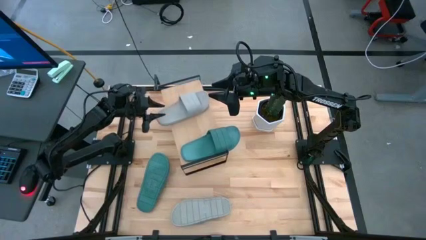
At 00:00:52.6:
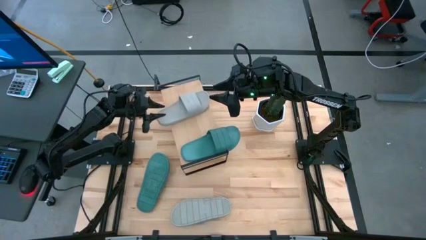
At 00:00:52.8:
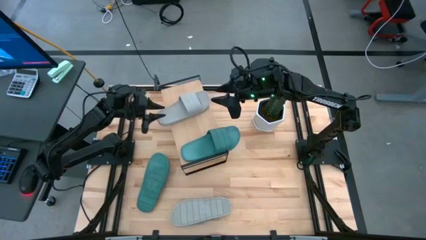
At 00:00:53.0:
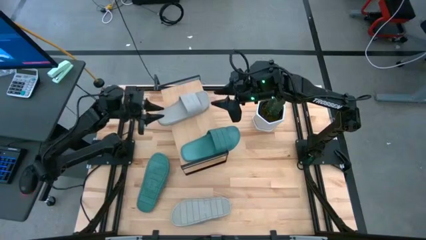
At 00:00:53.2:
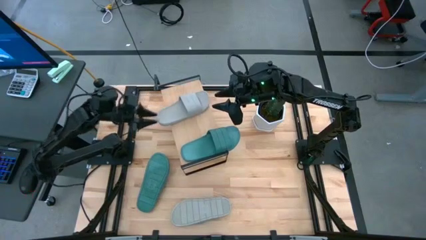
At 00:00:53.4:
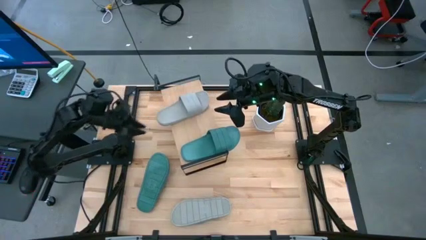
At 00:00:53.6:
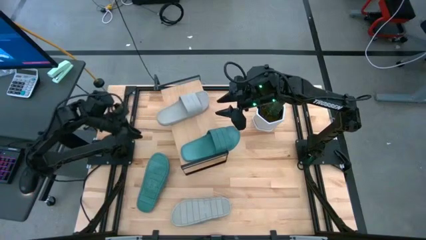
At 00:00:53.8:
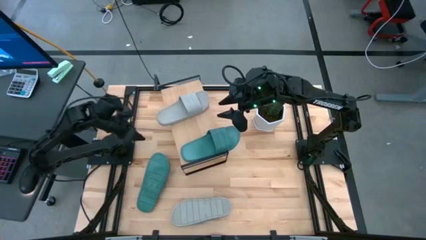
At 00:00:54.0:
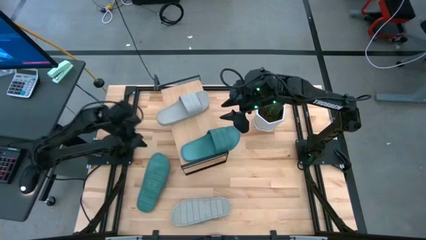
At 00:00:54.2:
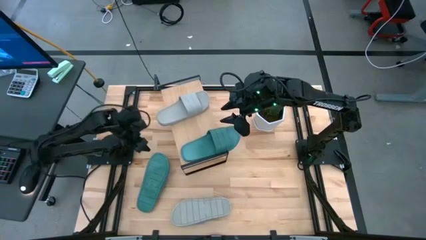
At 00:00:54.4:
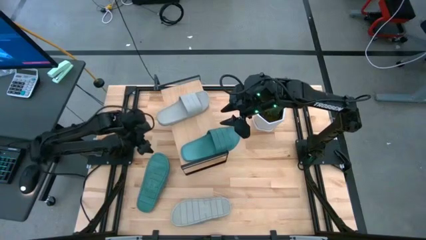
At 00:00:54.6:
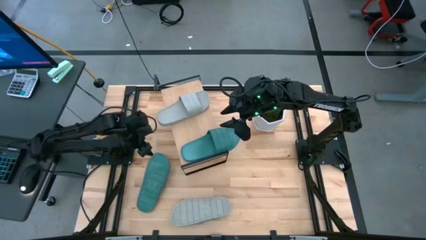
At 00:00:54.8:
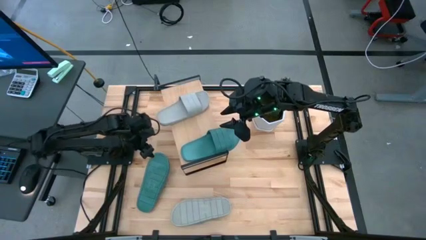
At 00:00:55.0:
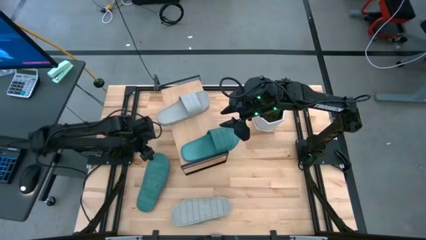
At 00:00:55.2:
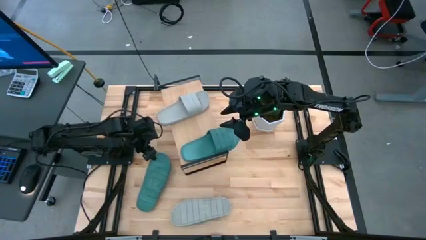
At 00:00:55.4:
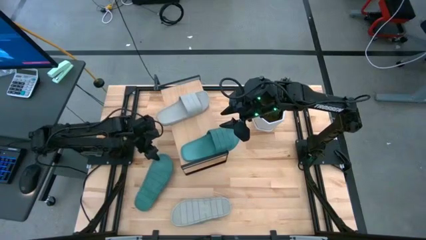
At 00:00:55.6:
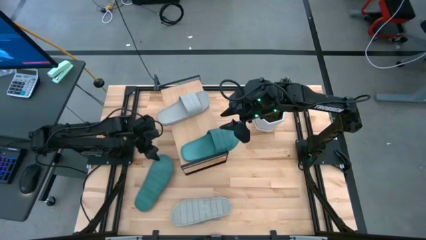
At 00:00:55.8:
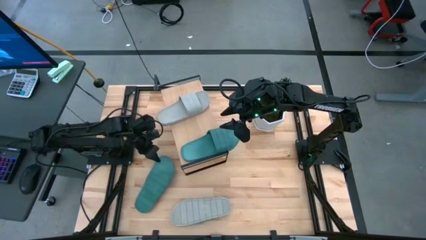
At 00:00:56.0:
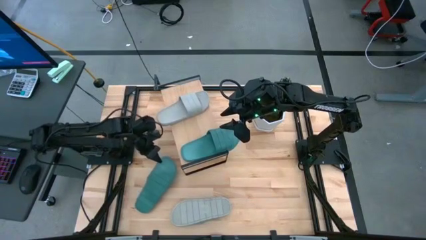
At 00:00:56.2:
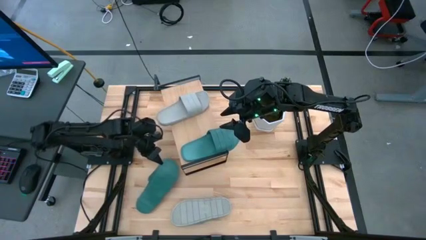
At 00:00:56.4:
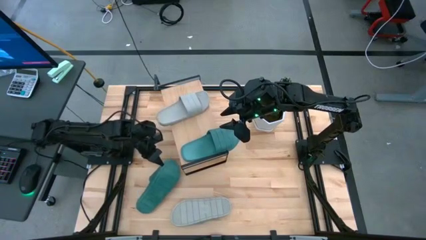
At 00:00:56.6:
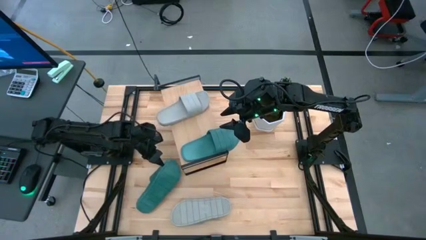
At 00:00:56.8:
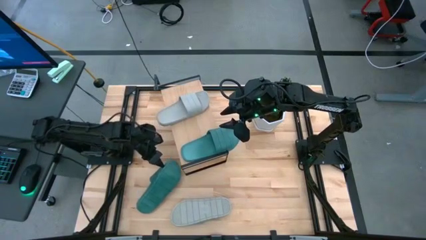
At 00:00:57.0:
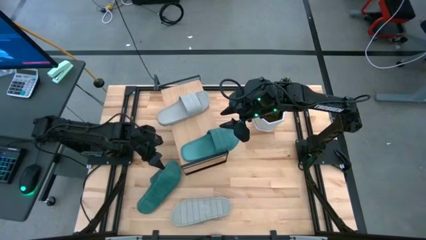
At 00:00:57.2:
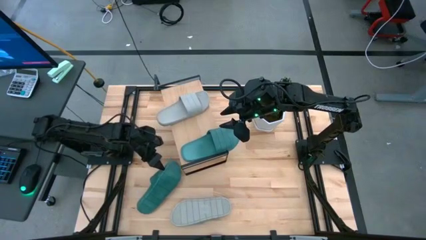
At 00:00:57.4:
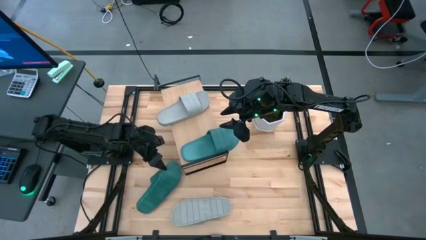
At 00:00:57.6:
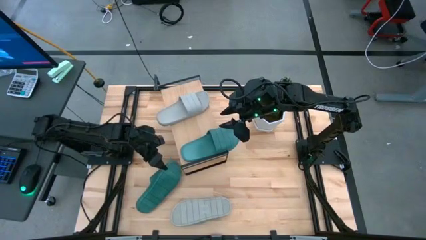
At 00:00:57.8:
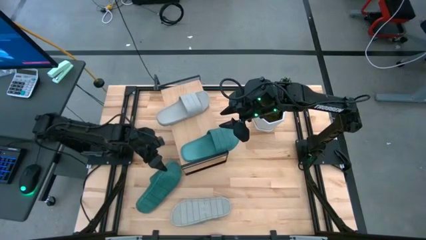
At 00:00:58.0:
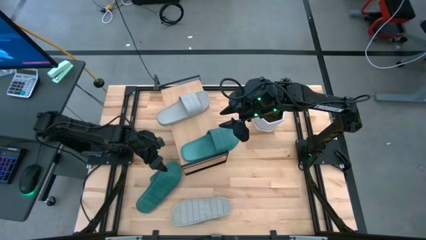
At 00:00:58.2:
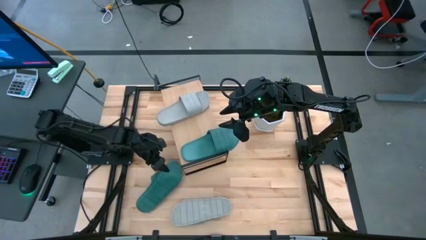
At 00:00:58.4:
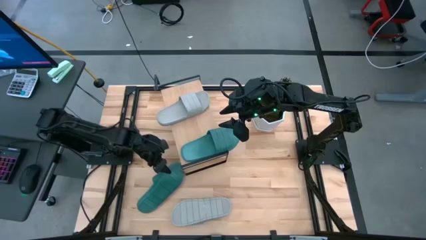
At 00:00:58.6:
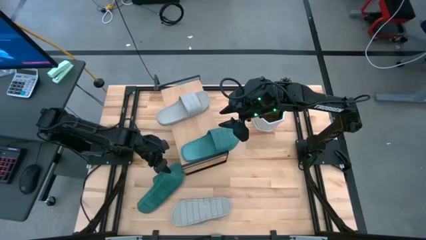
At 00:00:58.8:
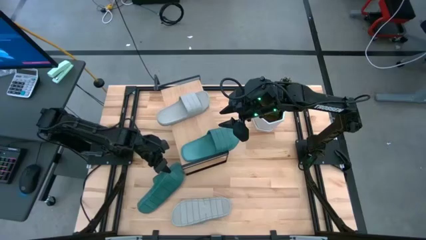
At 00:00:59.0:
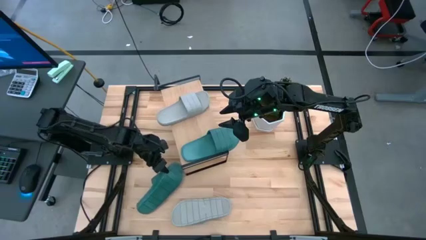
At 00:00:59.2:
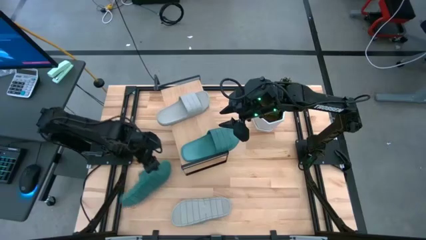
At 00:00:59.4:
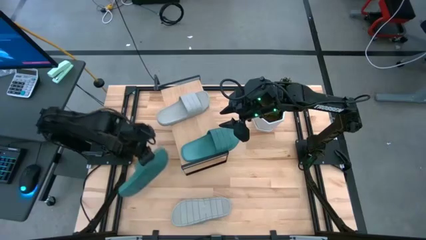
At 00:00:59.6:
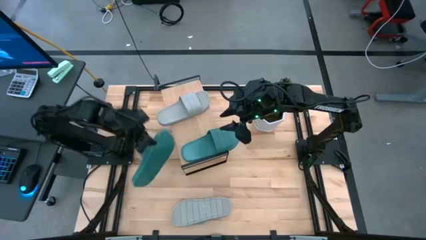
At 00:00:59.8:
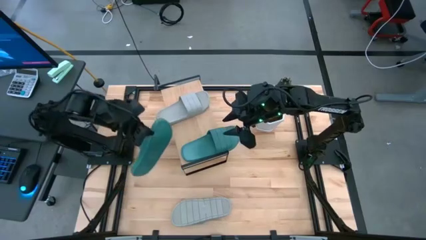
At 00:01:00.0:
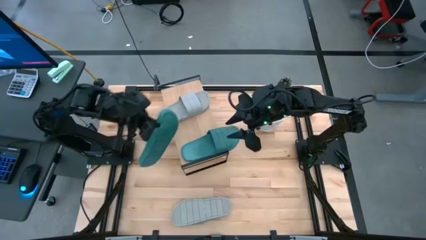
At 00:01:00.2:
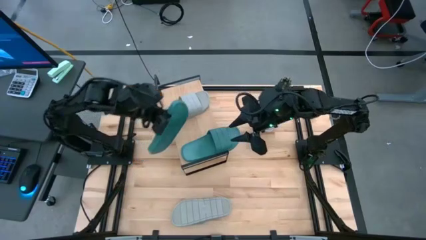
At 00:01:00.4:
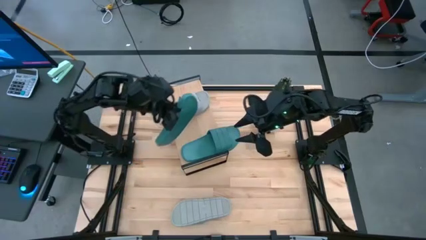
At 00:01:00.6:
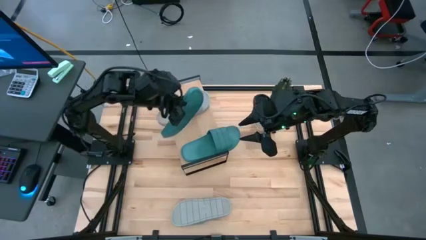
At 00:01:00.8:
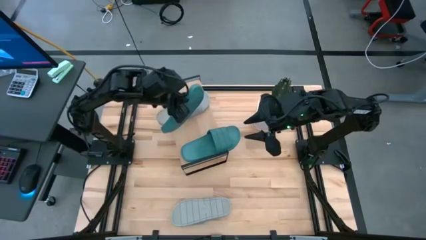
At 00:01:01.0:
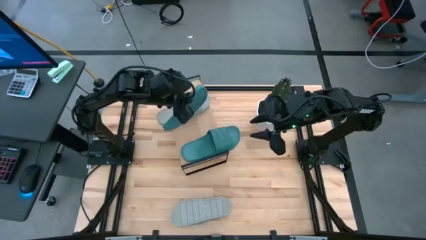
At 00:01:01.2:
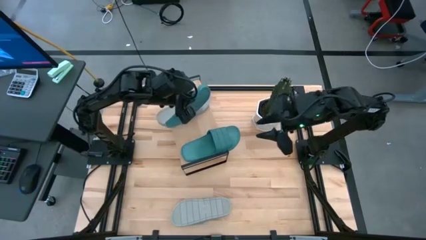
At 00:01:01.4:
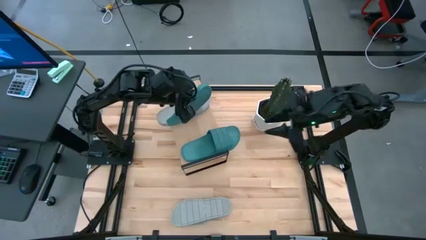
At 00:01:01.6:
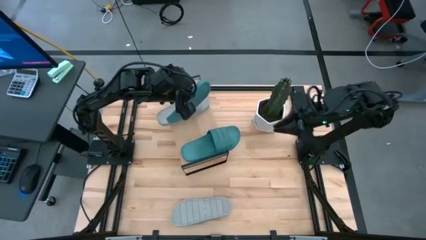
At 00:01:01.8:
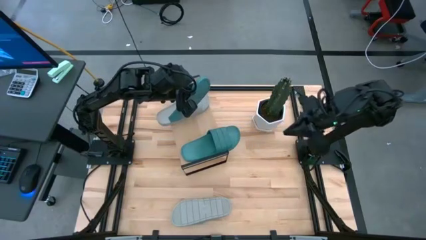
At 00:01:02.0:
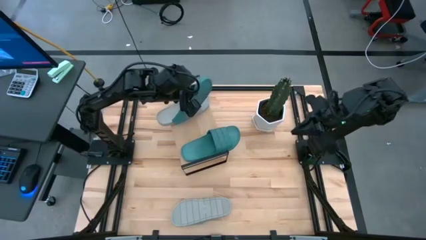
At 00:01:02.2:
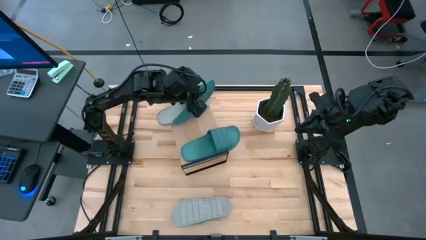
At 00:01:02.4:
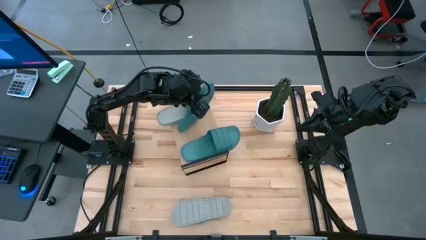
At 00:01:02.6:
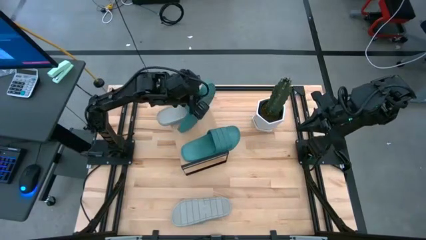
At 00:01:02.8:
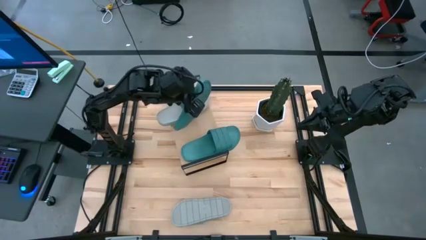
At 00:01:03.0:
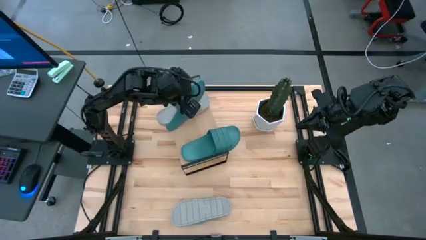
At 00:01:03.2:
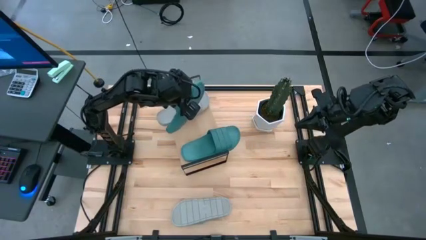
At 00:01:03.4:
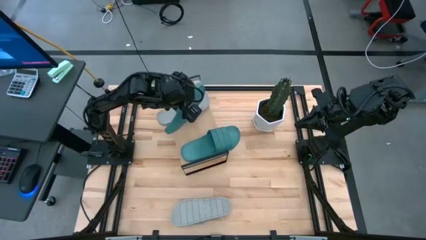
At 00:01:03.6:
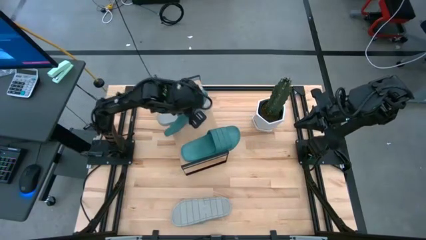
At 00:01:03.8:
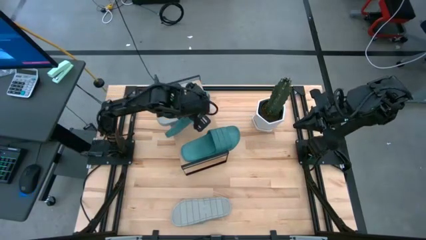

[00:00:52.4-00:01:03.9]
Task: Pick and place slides into the shelf
Put the green slipper on the shelf

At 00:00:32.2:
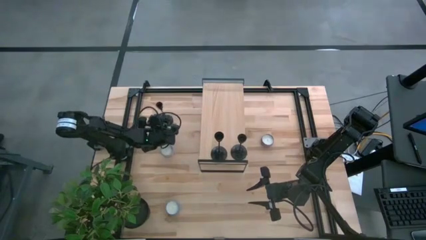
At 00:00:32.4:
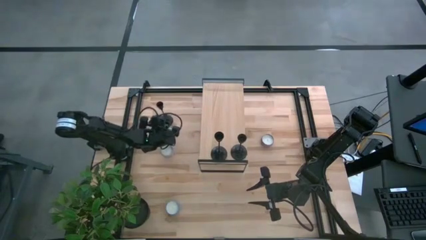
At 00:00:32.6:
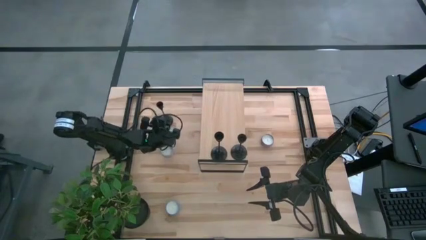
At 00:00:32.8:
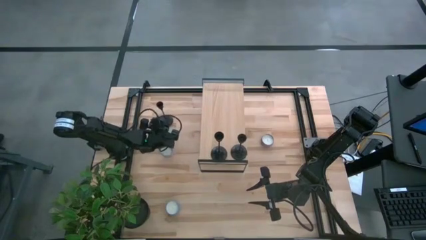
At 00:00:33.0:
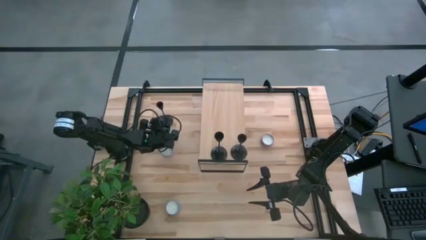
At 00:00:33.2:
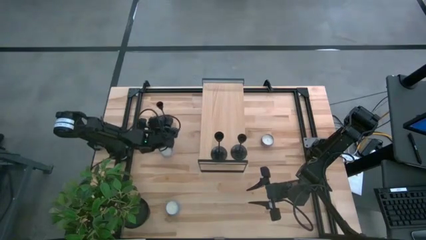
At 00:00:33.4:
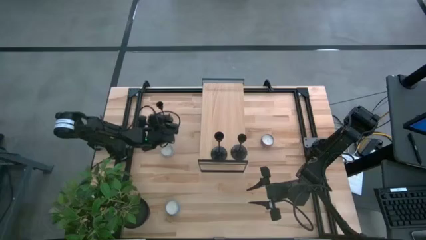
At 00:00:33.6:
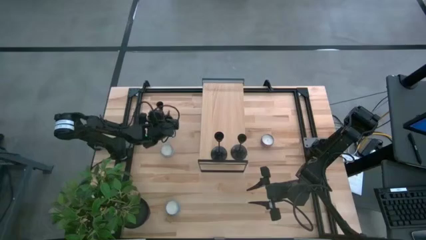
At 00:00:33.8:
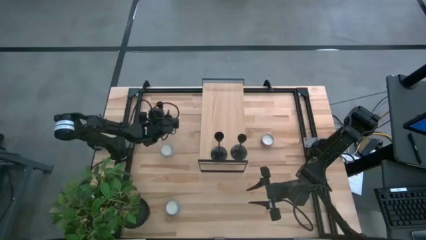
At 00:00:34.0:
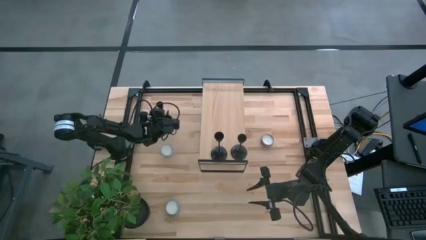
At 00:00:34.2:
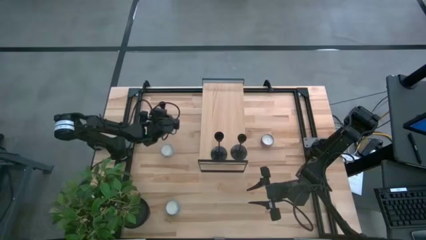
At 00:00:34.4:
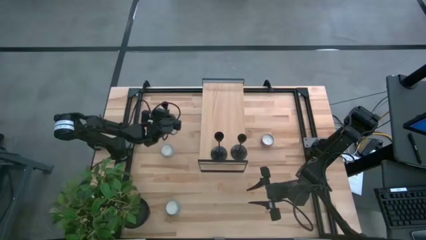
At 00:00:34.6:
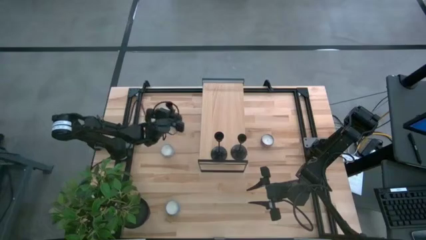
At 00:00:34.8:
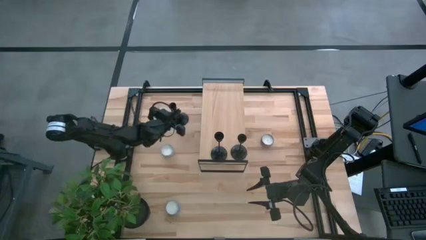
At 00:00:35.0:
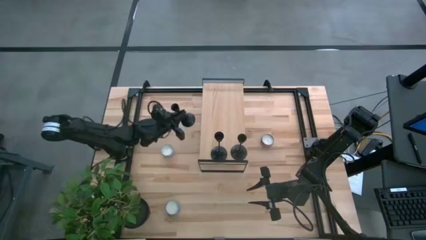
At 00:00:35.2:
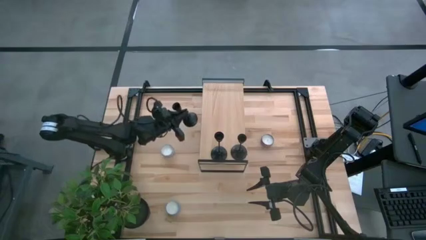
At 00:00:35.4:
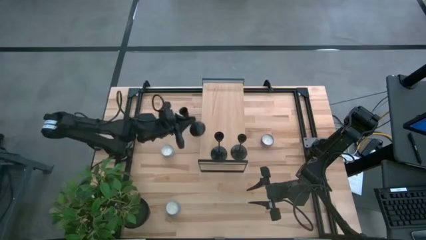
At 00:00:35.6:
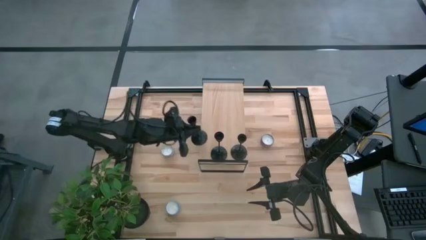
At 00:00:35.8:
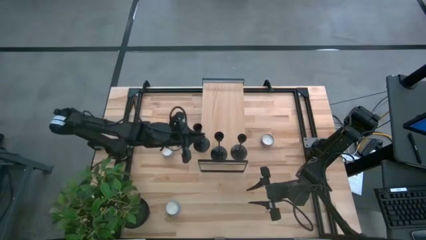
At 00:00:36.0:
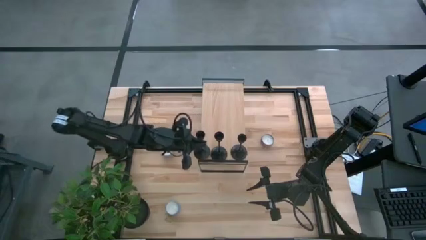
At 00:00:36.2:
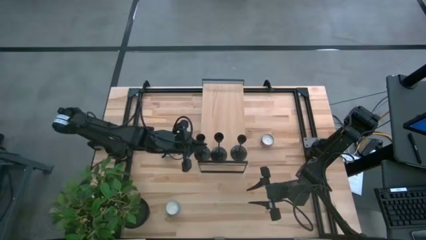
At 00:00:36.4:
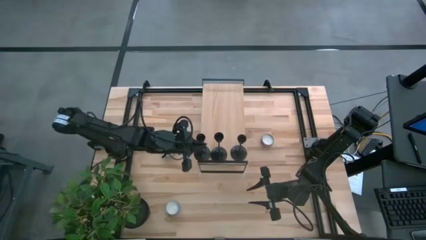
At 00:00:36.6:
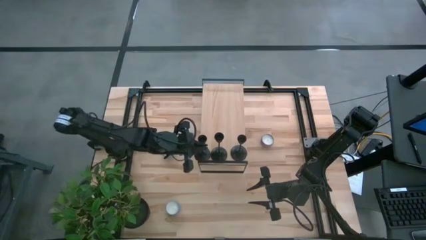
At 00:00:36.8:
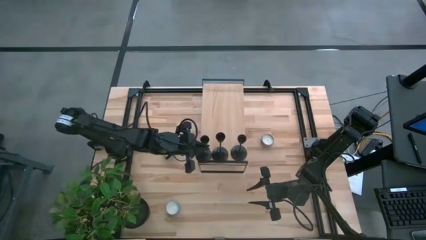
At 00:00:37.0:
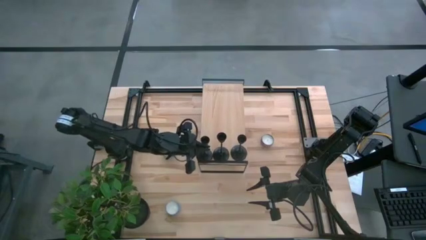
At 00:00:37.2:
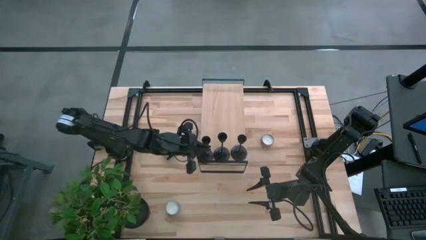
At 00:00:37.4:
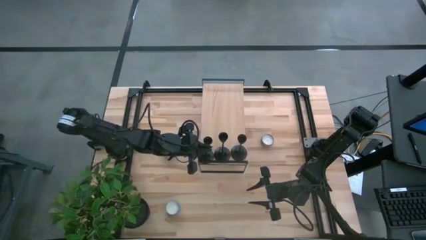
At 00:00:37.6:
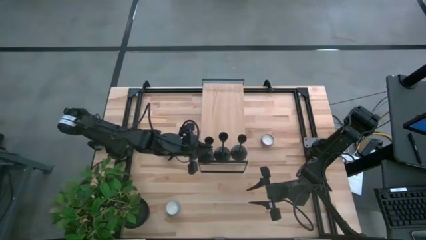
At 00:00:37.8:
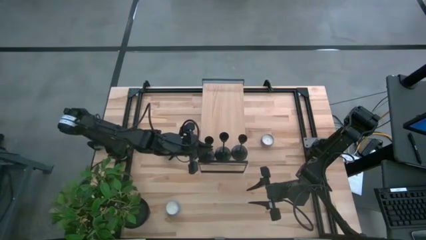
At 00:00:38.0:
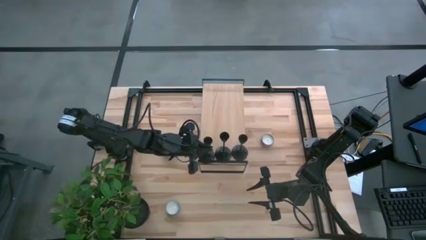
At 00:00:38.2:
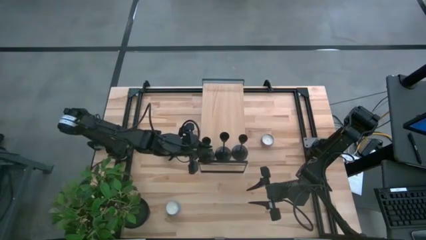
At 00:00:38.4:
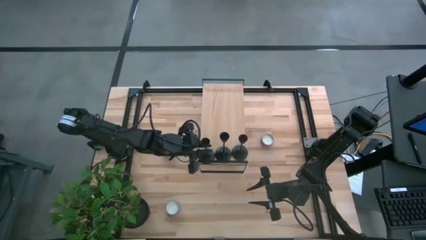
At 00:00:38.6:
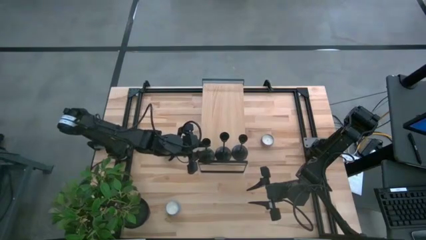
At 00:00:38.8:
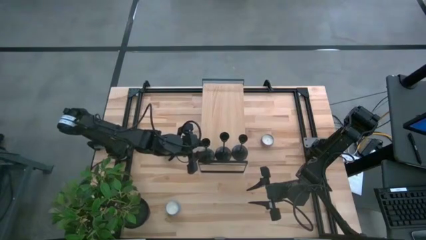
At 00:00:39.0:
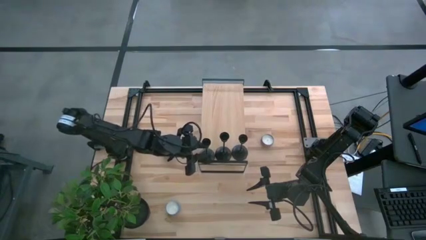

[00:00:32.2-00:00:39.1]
Task: Pick & Place candle stick holders
Put the black candle holder on the shelf aligned with the other black candle holder
